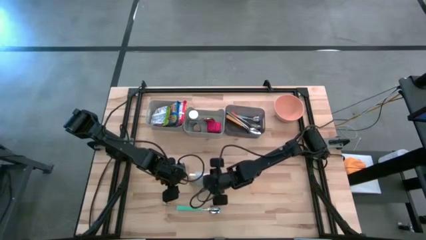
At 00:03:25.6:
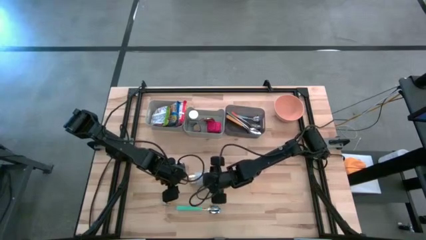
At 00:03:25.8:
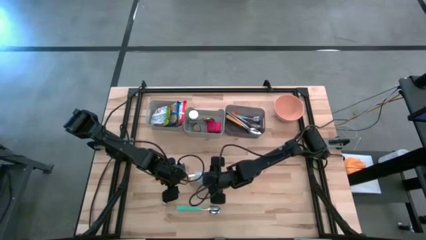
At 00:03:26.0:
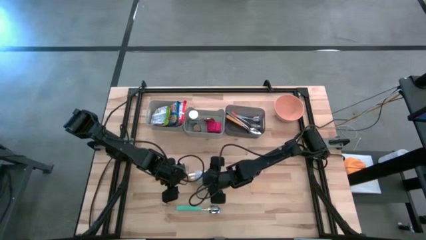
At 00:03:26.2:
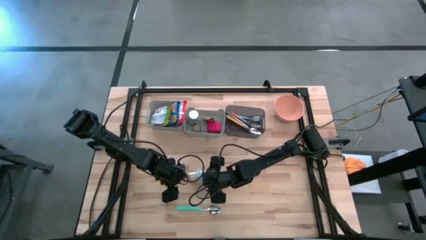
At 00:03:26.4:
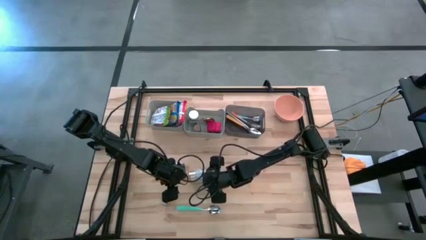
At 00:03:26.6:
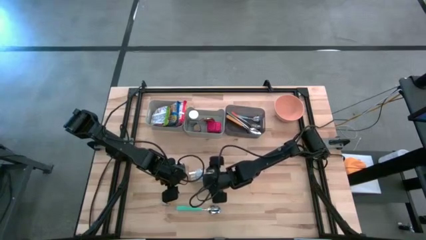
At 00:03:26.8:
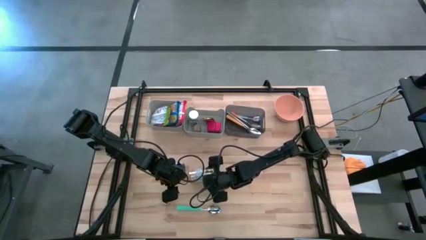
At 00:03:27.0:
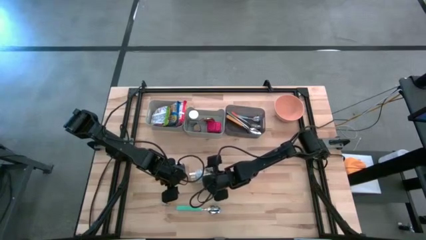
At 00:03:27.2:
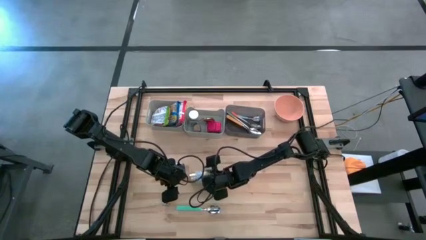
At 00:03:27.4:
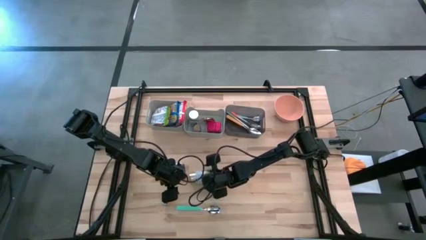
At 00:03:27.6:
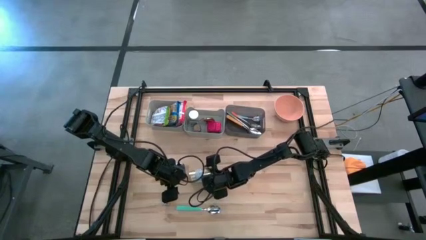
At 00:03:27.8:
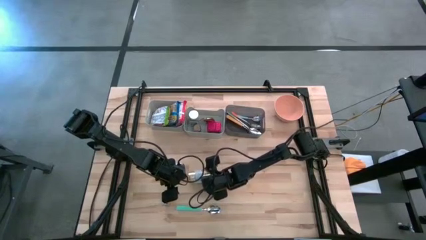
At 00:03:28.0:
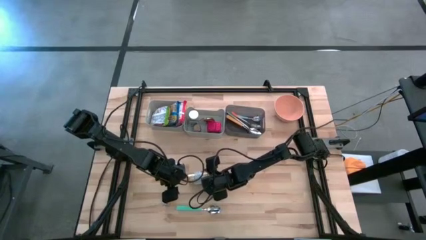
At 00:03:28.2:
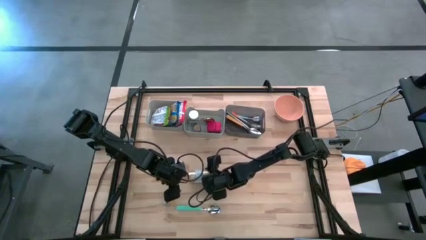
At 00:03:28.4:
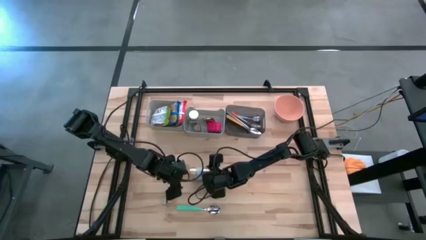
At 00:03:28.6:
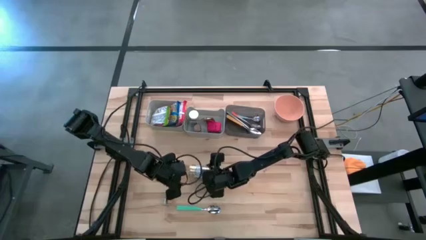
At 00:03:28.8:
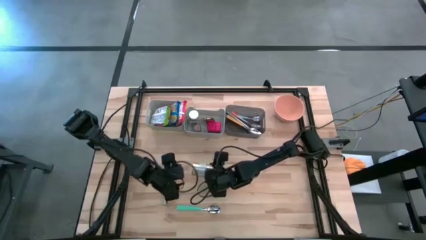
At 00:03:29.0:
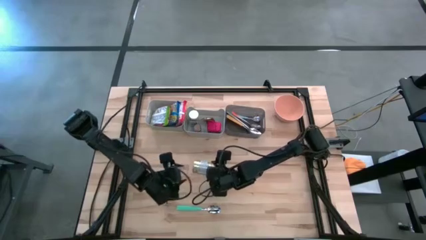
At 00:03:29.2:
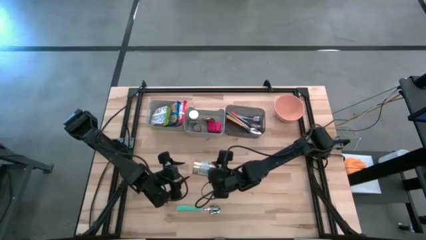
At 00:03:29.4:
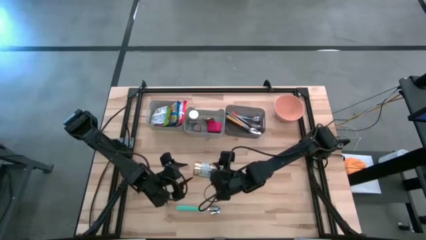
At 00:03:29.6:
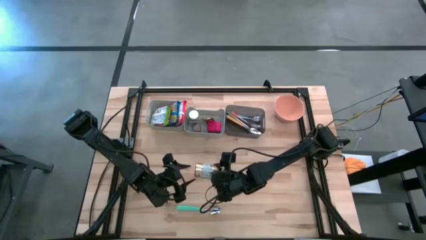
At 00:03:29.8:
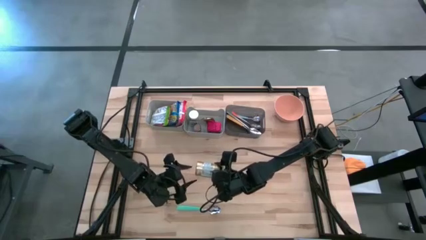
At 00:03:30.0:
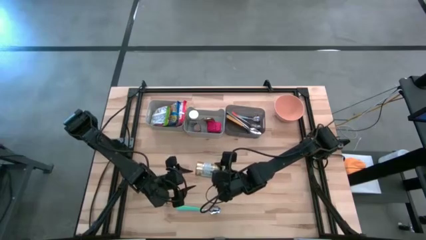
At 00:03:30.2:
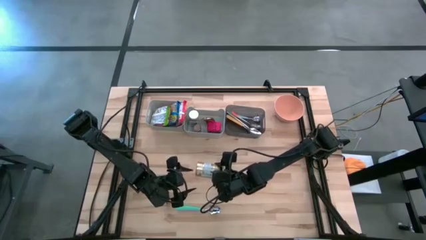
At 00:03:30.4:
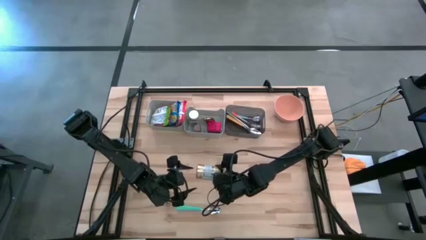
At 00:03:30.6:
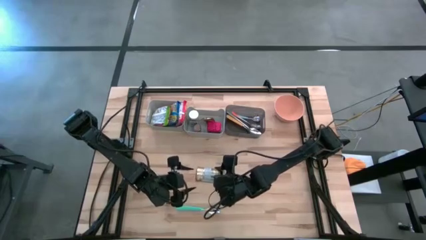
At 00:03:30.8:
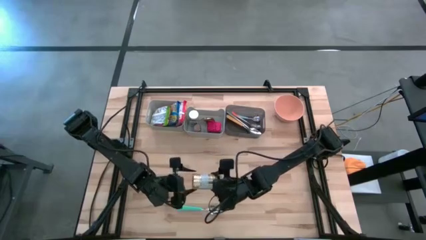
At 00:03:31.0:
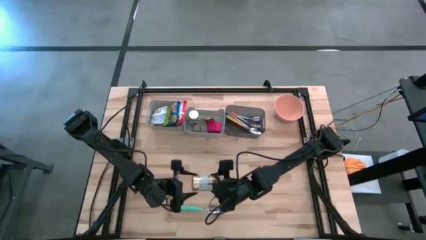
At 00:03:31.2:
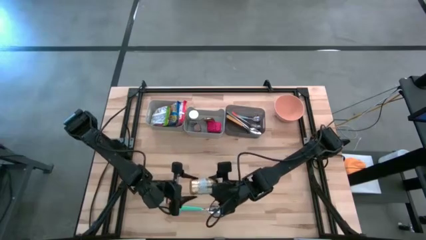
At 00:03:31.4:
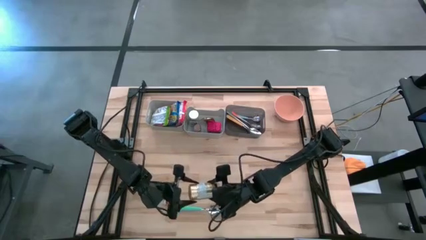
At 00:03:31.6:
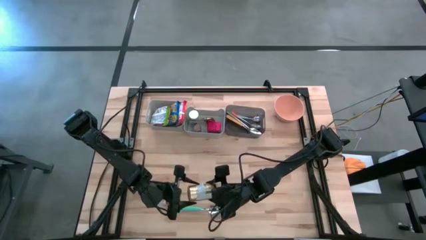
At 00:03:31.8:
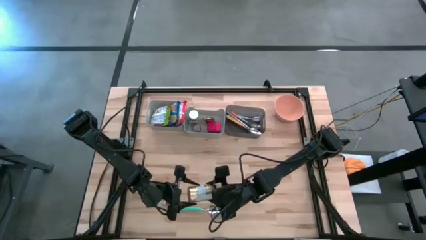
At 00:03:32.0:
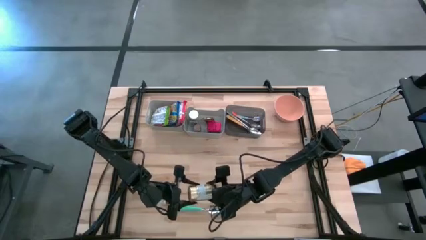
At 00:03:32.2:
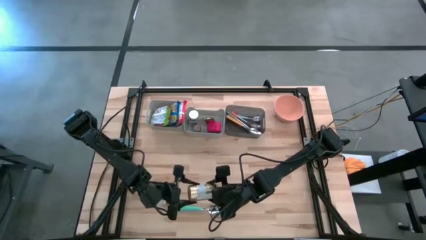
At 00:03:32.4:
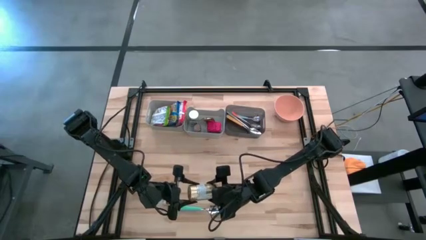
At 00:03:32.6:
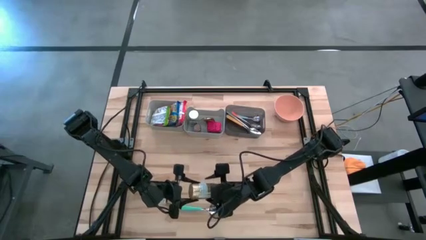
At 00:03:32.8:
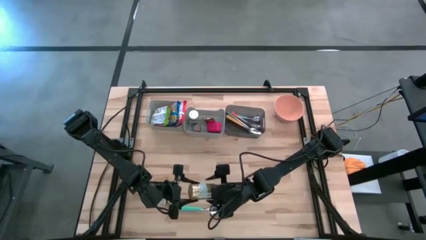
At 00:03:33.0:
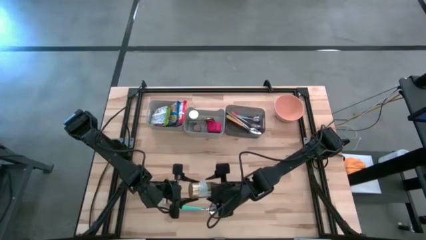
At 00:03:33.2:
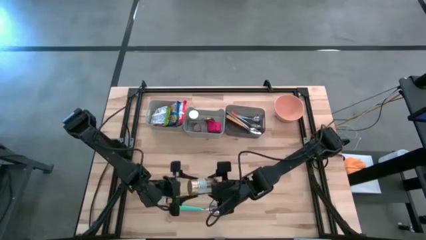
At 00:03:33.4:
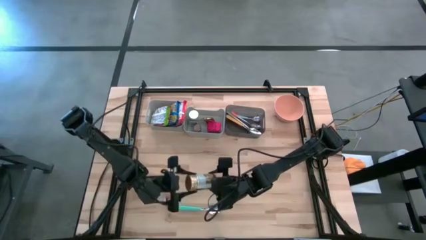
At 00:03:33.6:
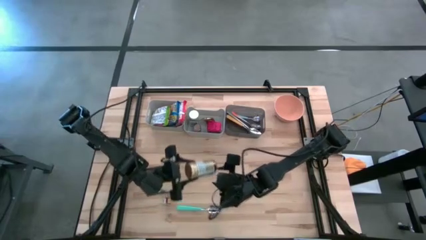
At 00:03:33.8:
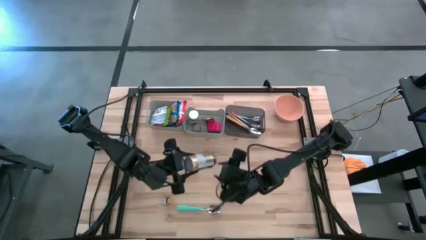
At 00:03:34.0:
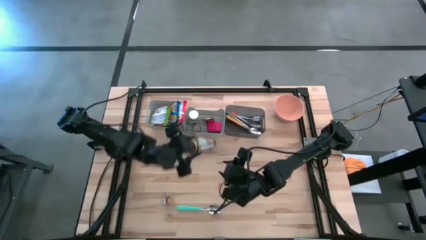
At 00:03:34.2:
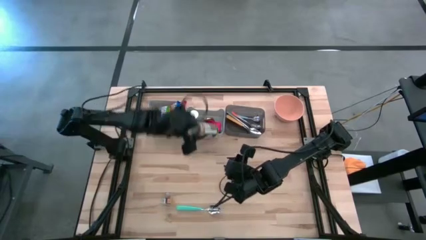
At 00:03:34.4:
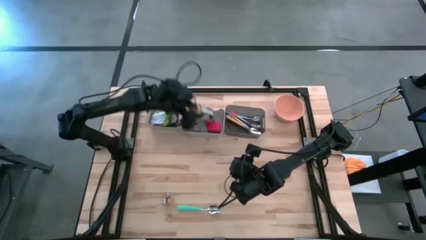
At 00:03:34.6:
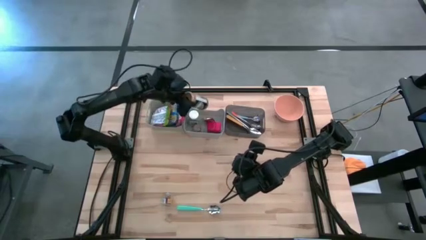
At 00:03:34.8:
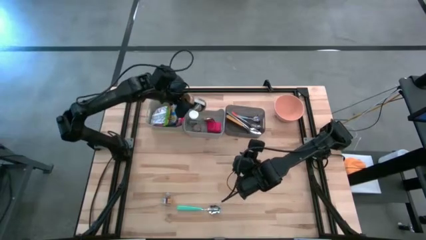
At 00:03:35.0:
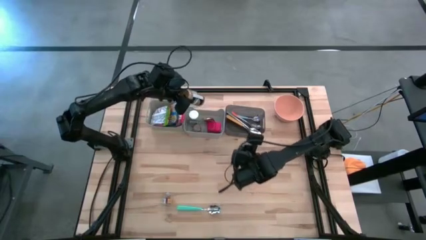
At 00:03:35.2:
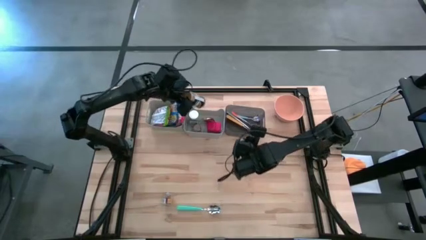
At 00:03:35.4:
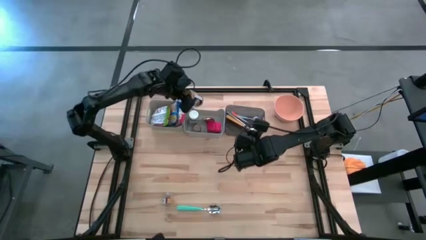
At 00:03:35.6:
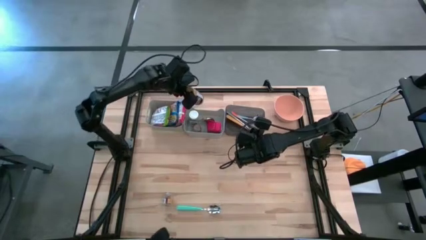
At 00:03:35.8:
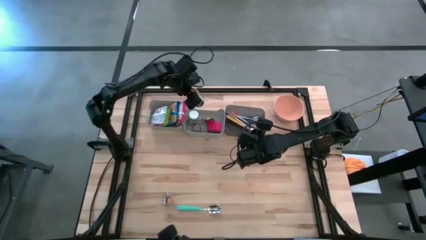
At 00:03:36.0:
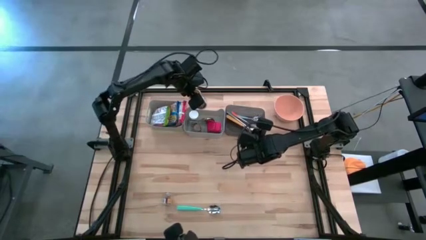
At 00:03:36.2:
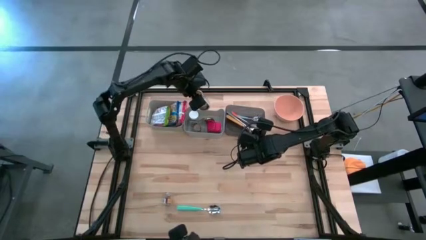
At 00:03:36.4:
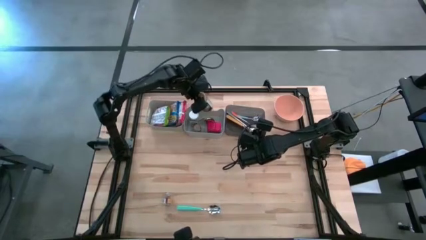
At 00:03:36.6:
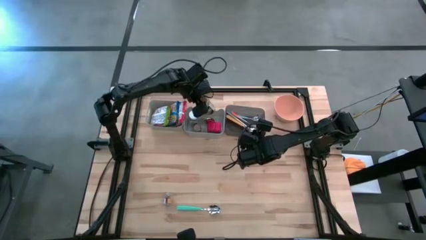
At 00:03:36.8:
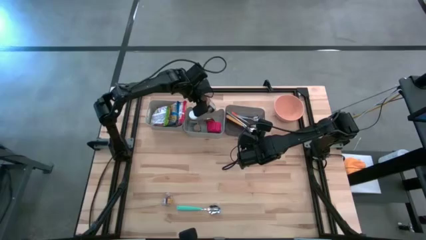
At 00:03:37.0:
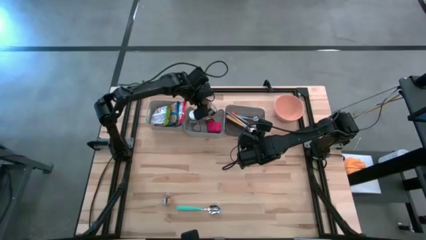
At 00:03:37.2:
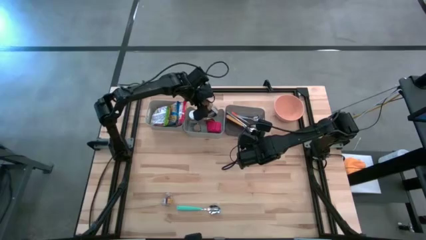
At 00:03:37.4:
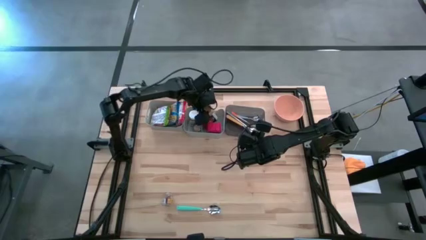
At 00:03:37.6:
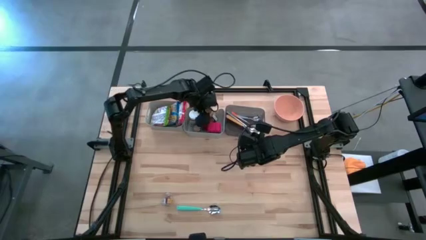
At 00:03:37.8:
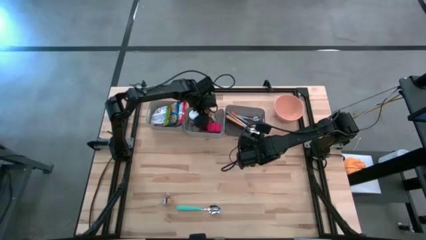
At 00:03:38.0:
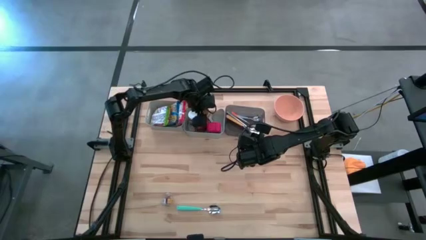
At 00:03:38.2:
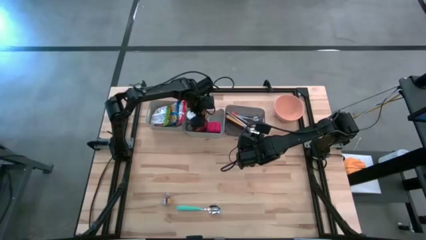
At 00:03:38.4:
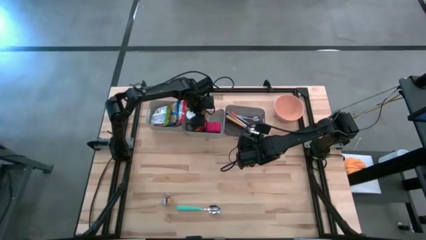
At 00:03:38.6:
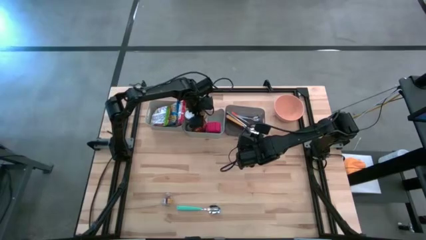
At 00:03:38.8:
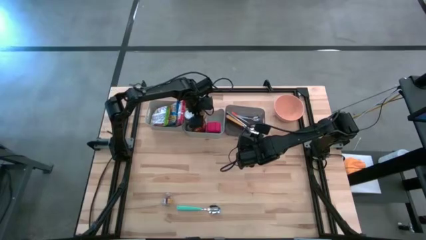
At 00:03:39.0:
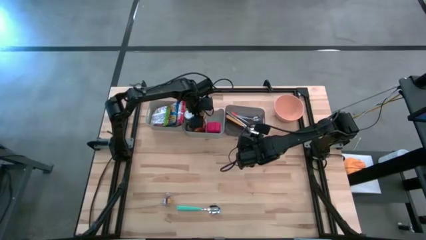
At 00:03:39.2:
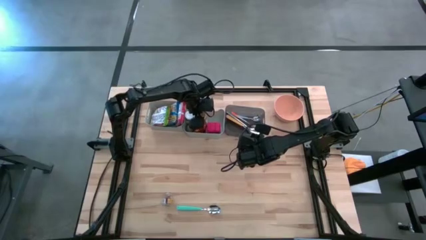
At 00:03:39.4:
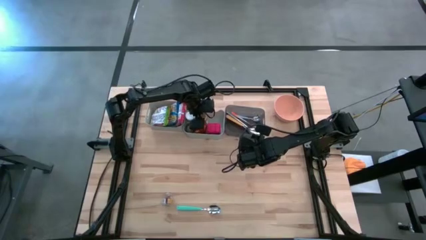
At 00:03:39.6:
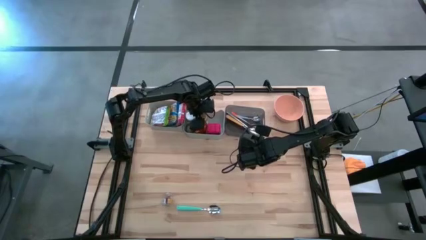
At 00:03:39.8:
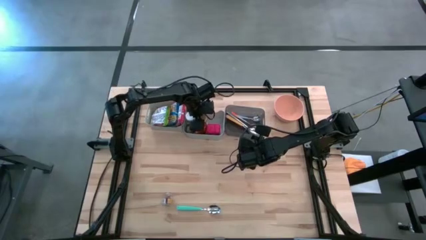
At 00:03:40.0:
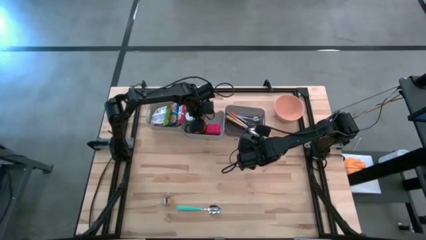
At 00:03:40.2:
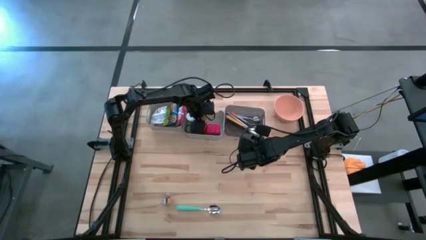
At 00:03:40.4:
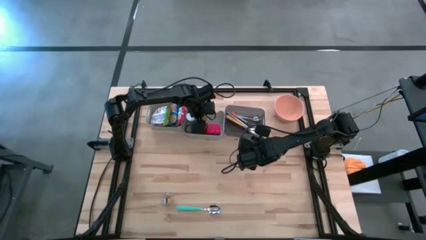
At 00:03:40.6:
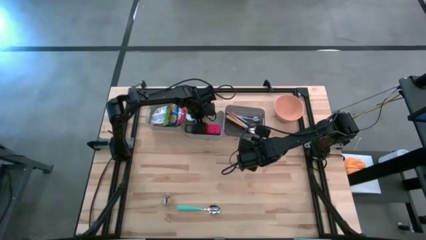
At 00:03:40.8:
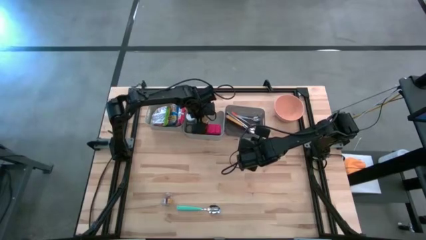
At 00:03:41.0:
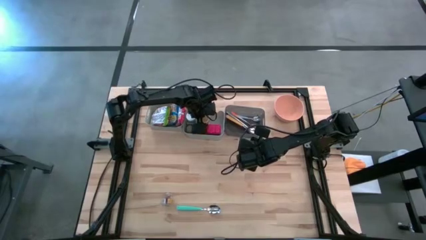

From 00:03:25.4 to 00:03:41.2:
Put the golden seasoning bottle into the right gray bin
